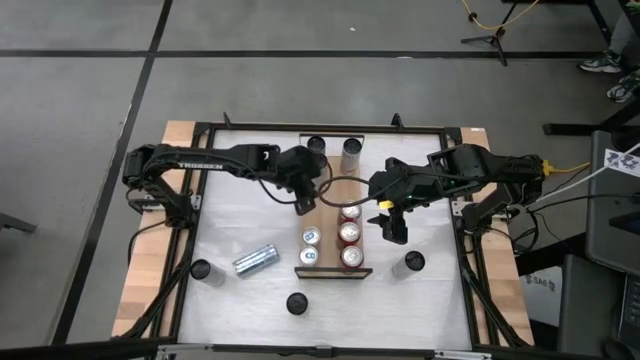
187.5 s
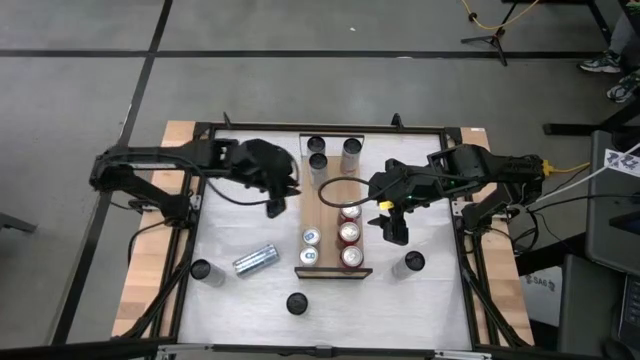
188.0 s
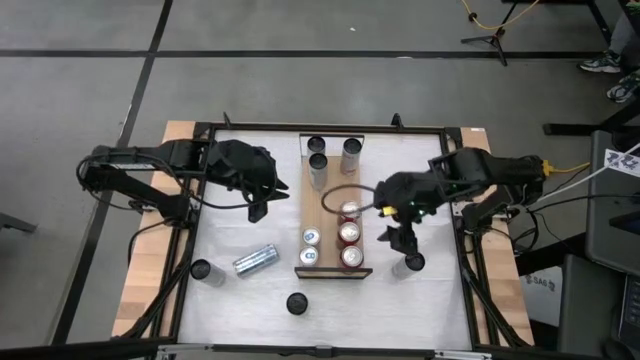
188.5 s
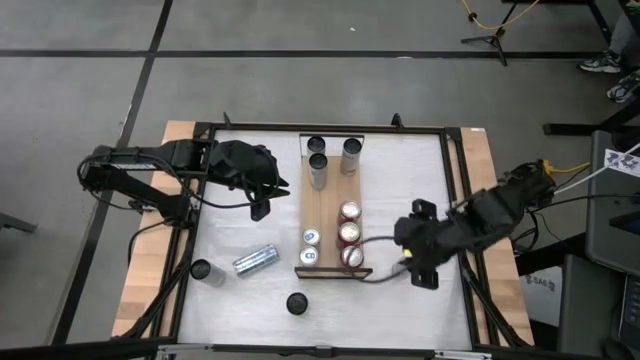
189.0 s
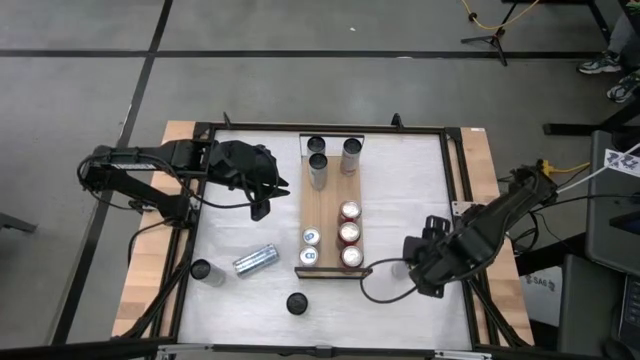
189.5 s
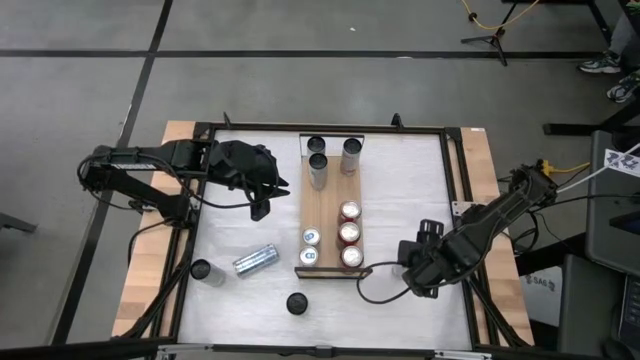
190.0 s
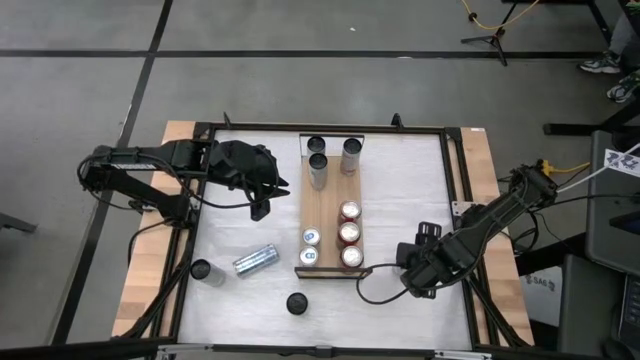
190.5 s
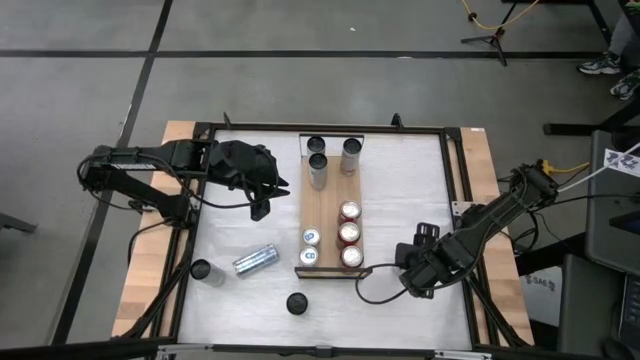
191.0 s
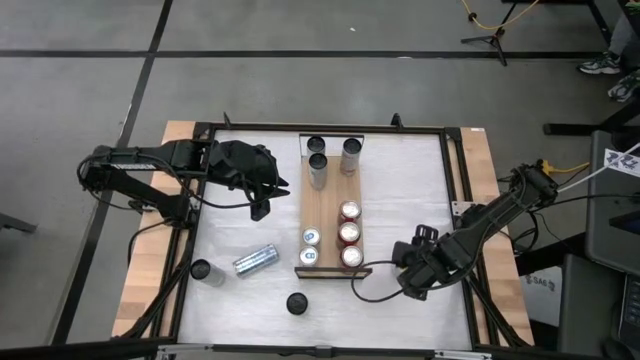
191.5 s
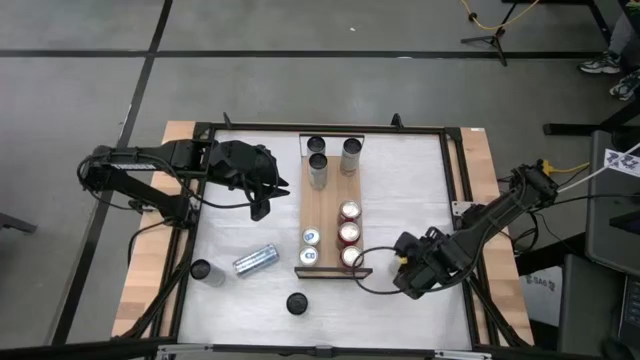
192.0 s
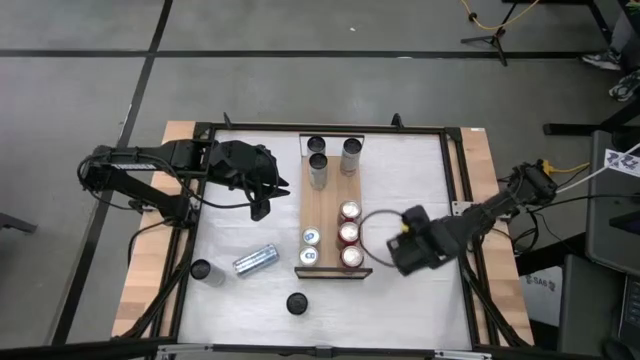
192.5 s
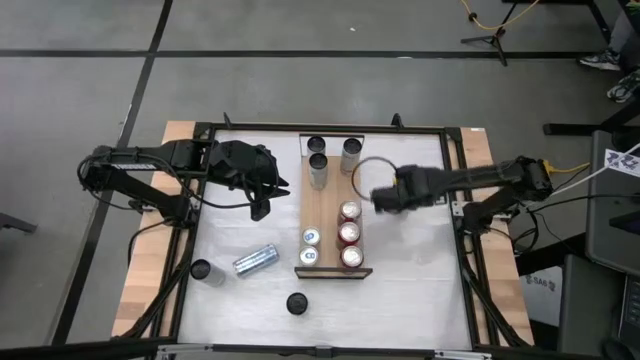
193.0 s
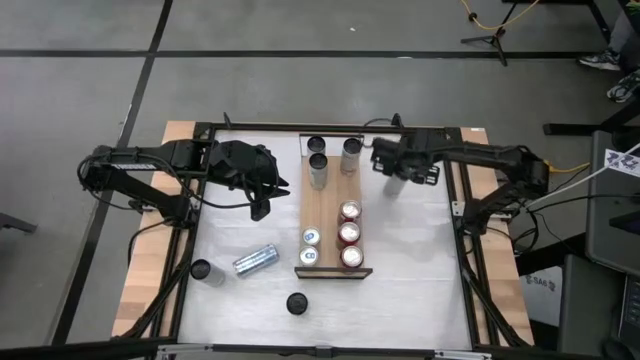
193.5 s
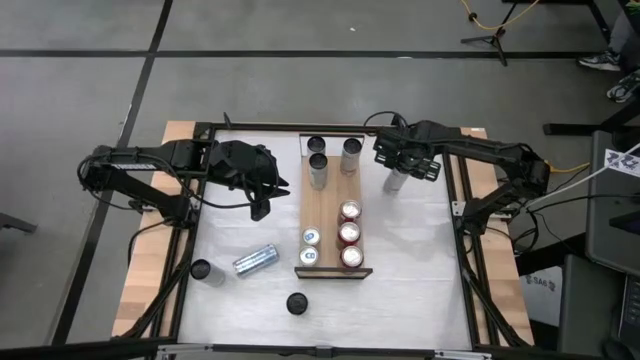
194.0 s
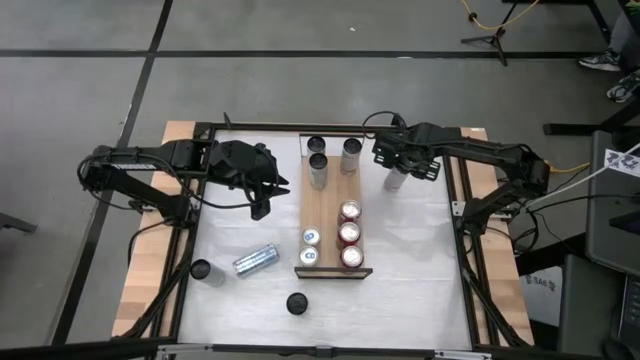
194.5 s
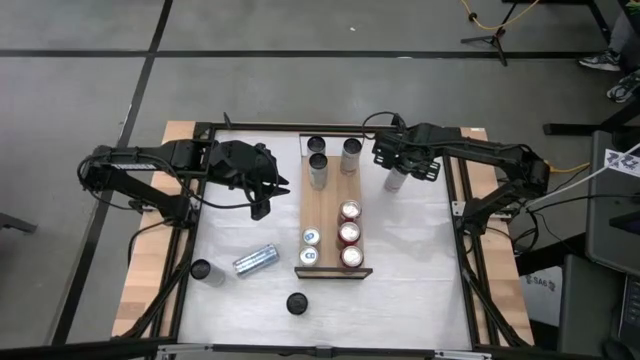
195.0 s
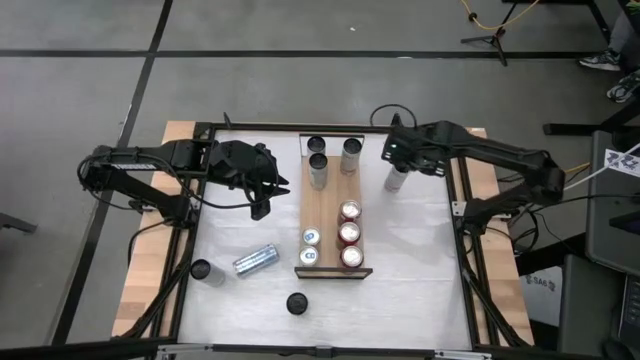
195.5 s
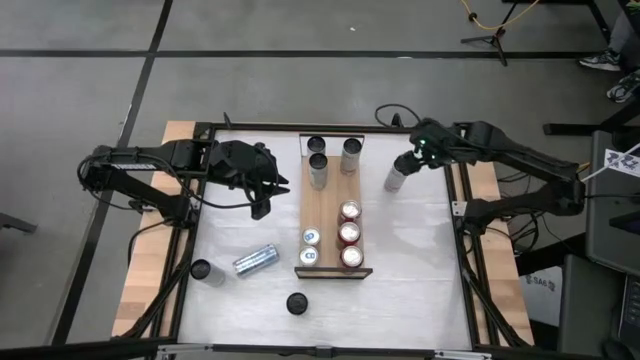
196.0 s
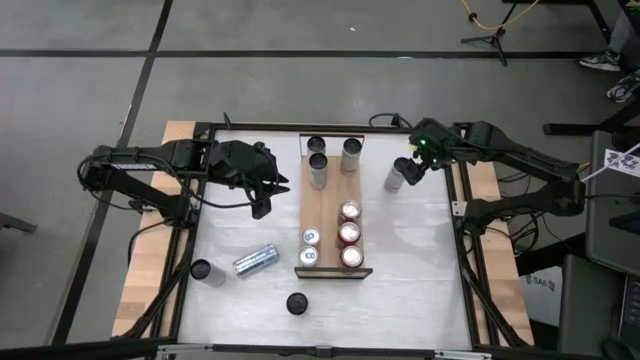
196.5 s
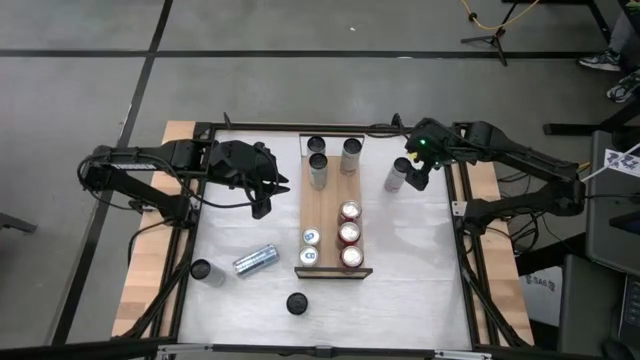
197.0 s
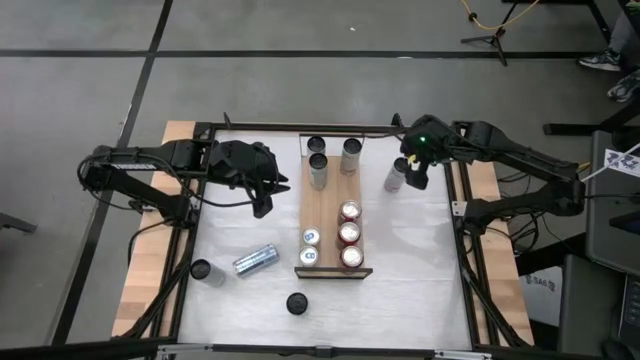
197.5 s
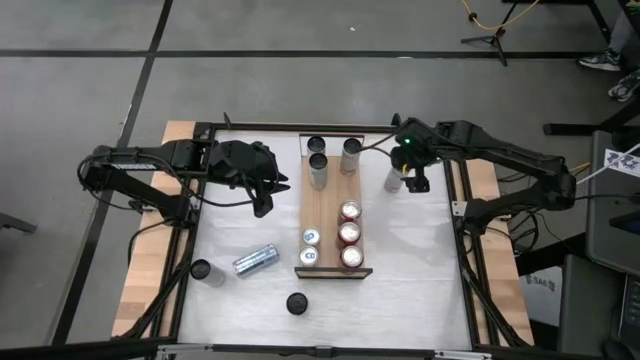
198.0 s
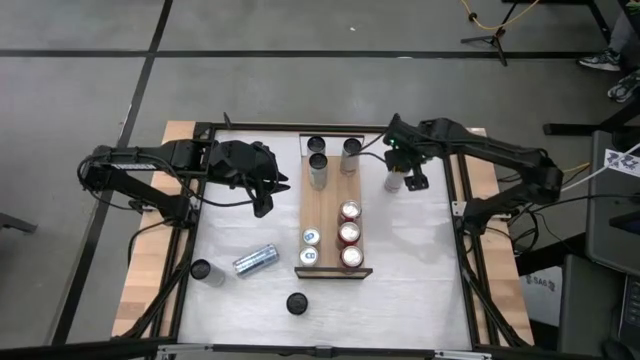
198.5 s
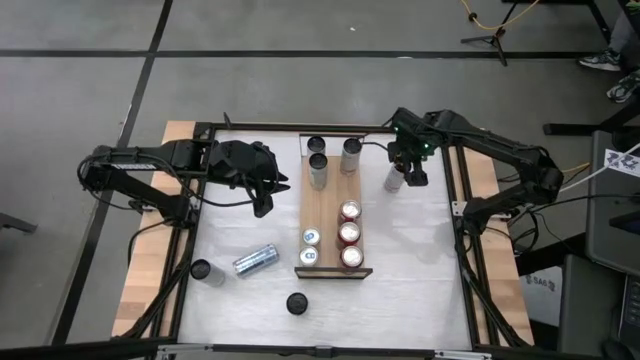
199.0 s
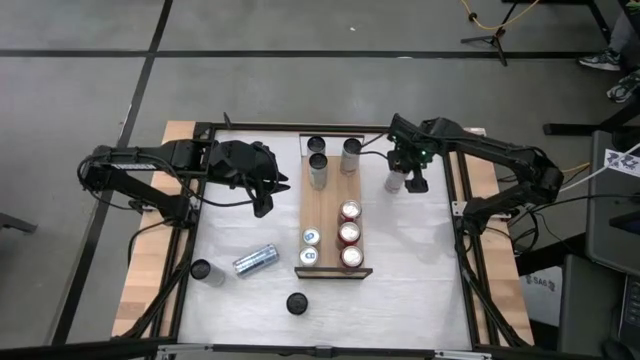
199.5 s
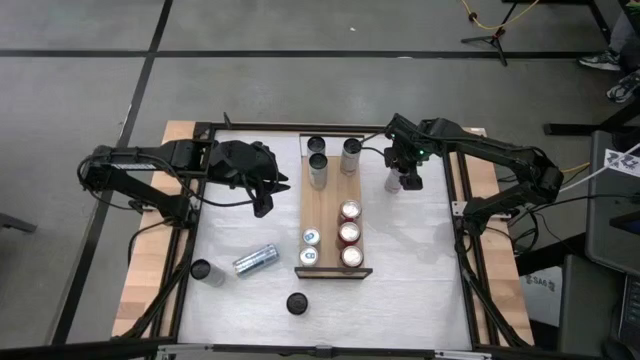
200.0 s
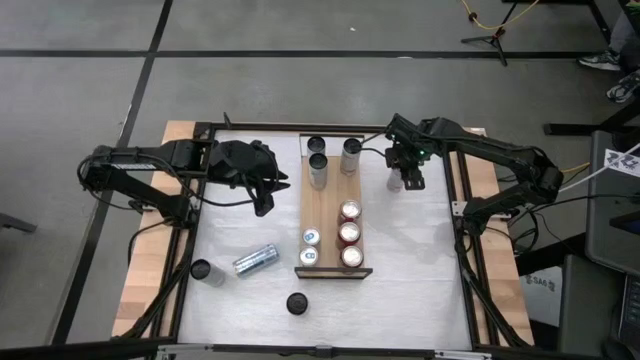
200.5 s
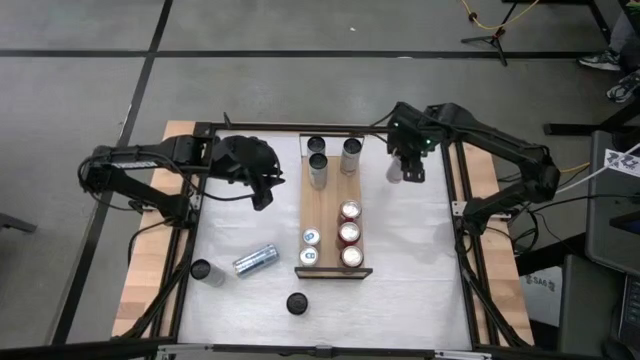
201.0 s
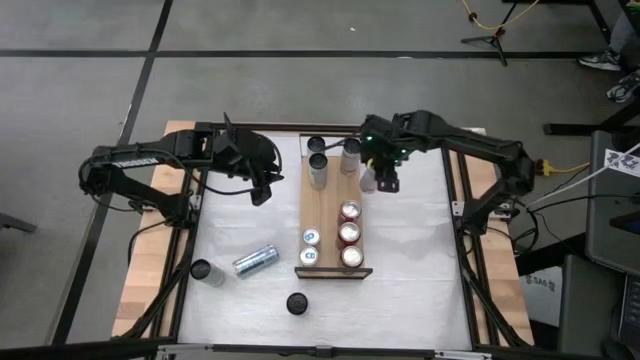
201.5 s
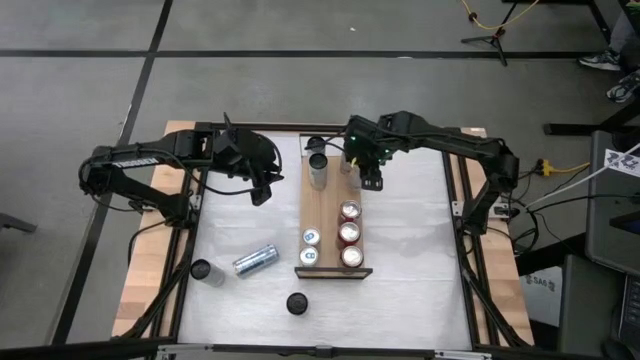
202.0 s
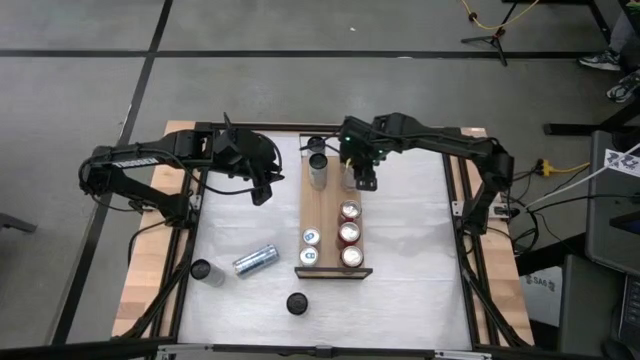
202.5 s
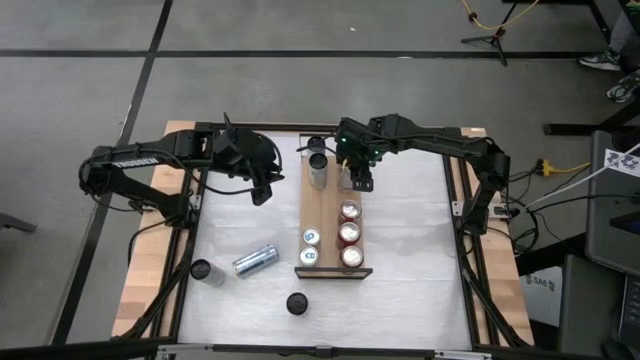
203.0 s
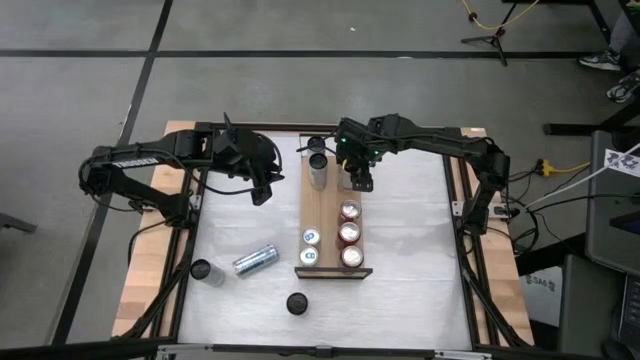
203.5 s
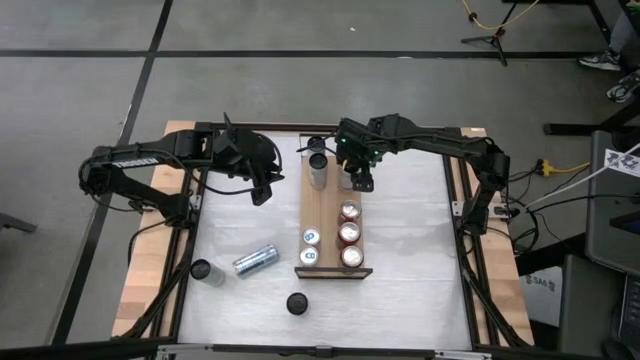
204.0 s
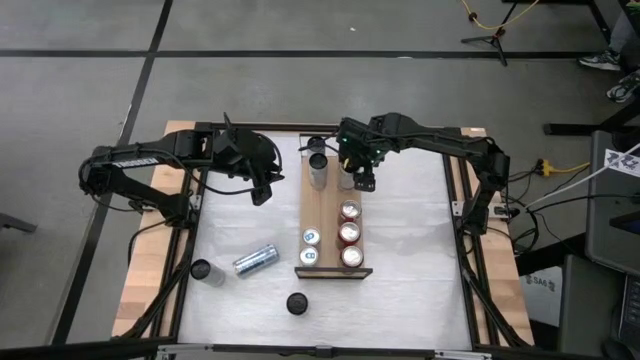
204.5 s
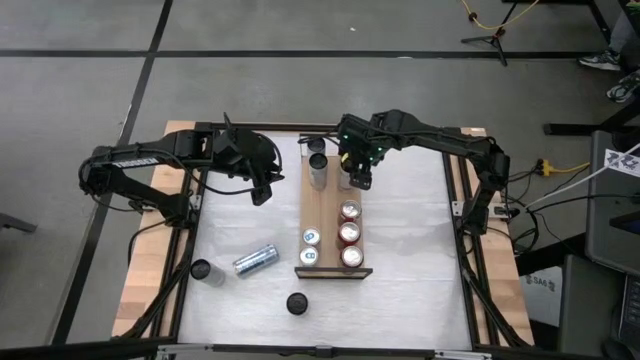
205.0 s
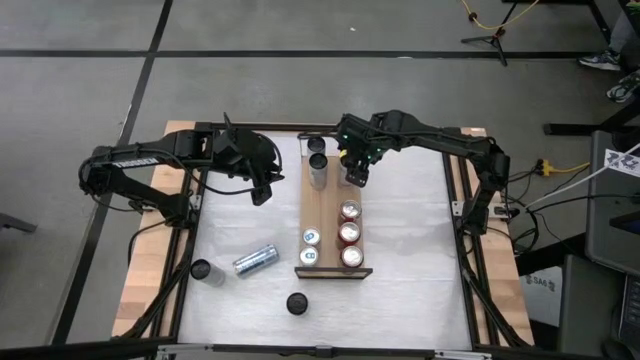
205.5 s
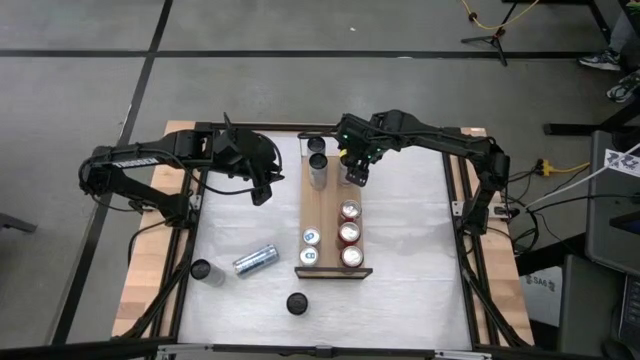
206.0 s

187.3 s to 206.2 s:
Task: Place canned beverage on shelf
Put the white pink soda can on the shelf aligned with the other white pink soda can

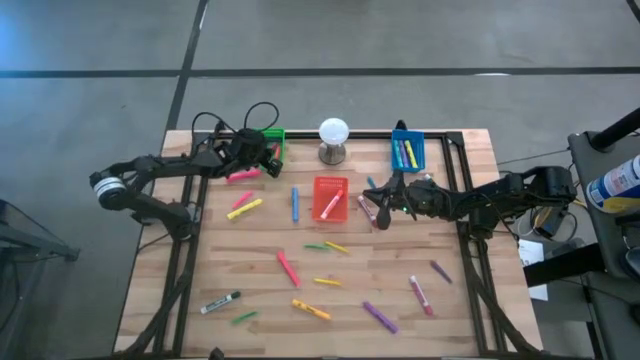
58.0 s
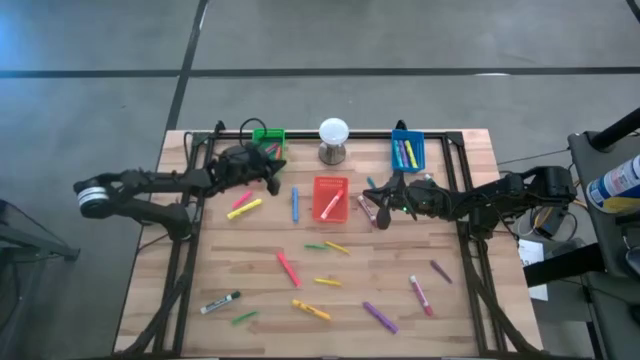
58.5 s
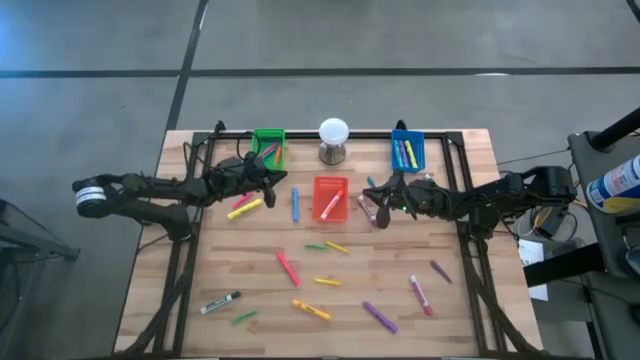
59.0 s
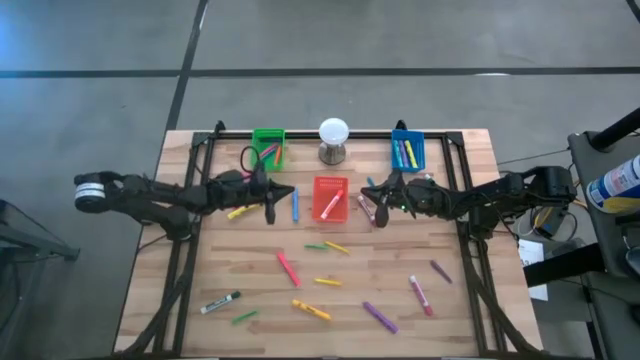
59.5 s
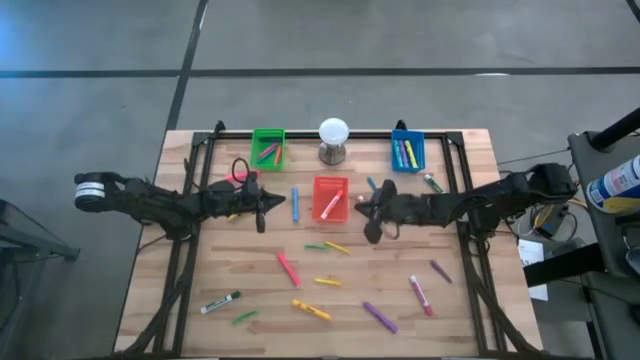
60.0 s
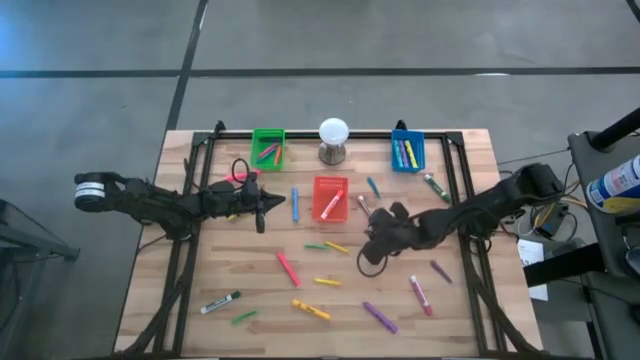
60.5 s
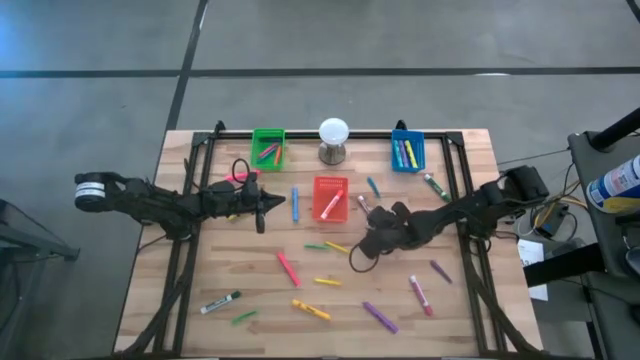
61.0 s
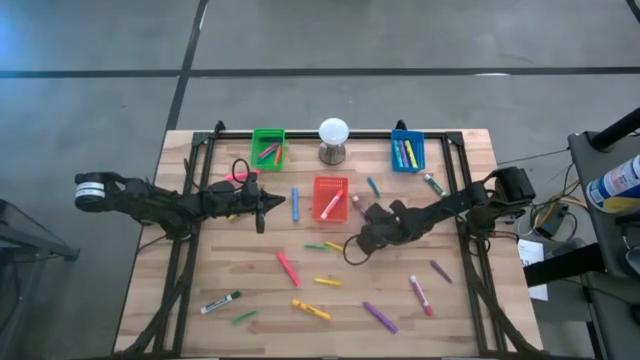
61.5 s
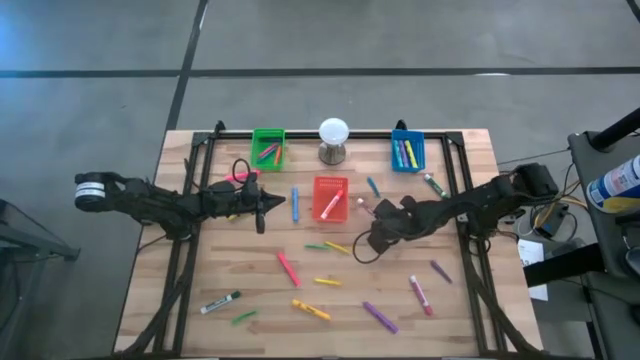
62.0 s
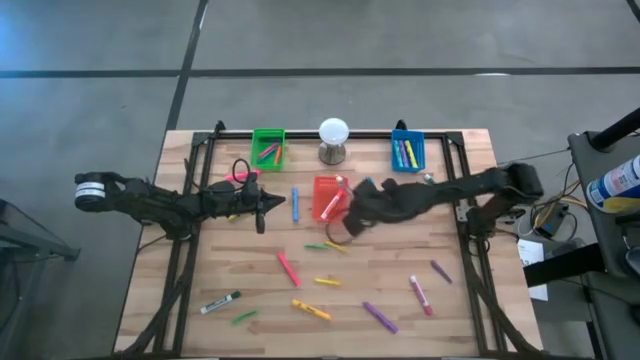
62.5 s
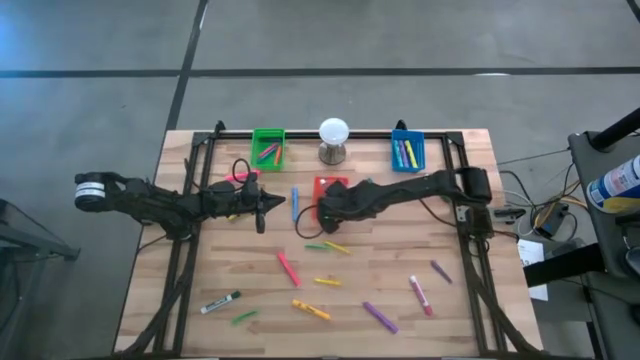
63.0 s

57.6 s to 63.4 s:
Task: Pick & Place Markers
Put the red marker into the orange bin
